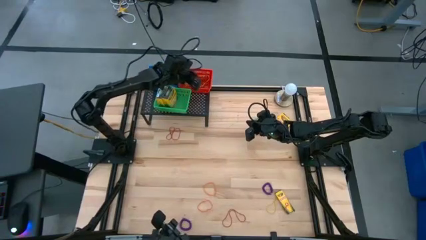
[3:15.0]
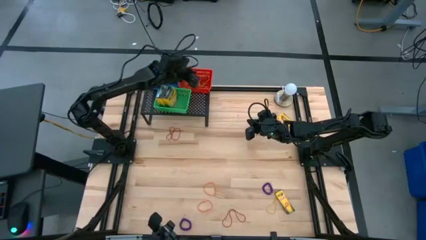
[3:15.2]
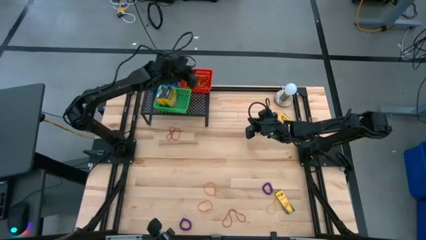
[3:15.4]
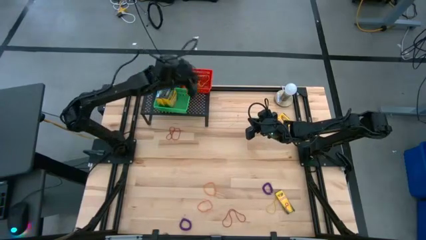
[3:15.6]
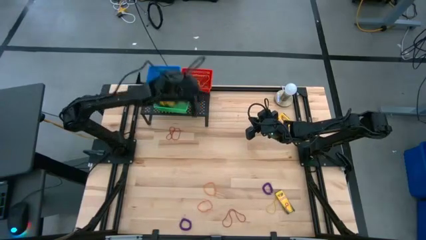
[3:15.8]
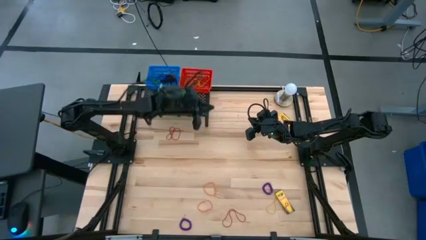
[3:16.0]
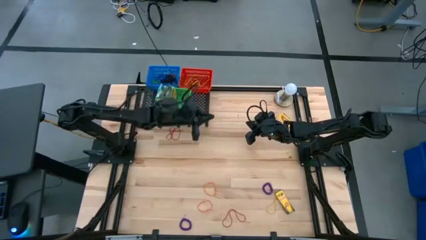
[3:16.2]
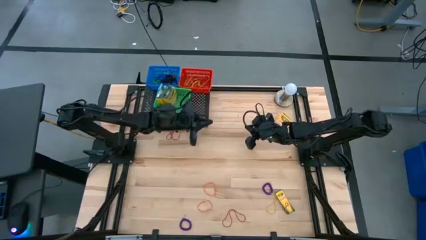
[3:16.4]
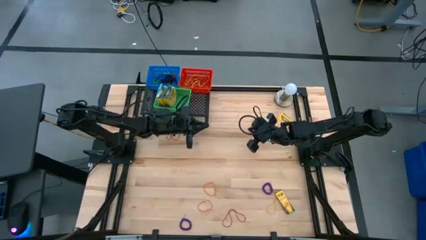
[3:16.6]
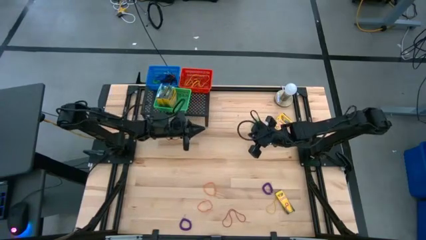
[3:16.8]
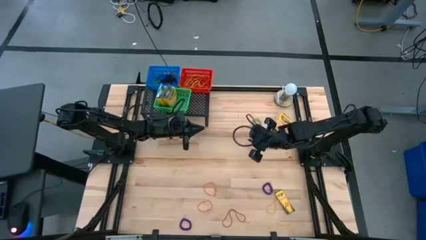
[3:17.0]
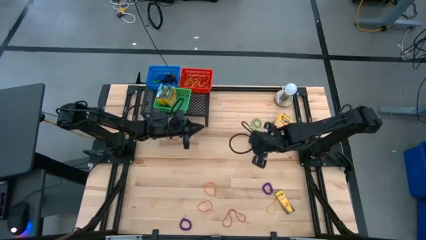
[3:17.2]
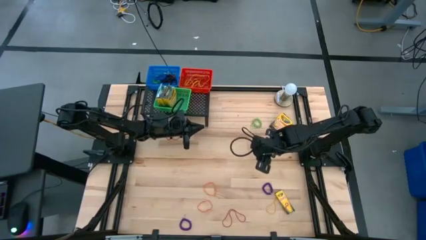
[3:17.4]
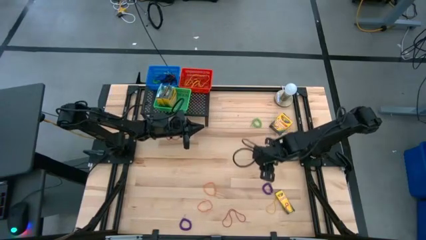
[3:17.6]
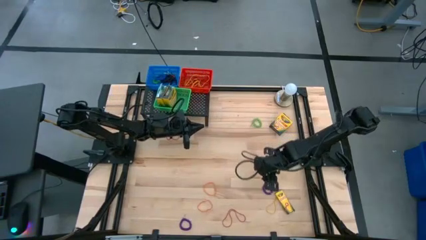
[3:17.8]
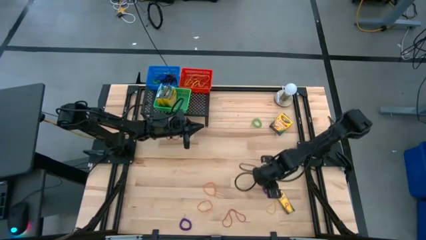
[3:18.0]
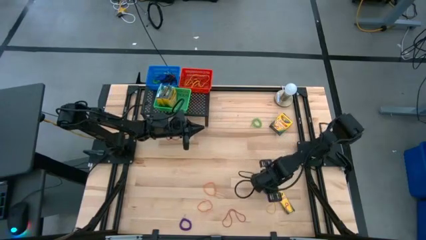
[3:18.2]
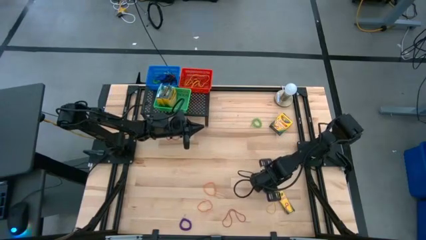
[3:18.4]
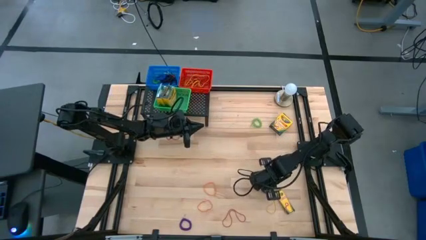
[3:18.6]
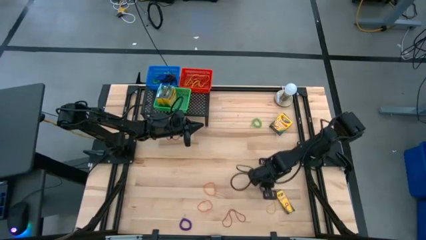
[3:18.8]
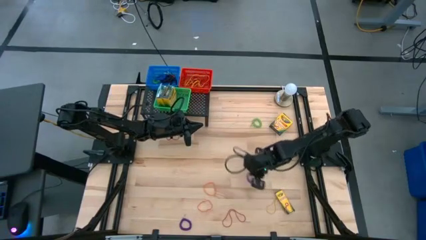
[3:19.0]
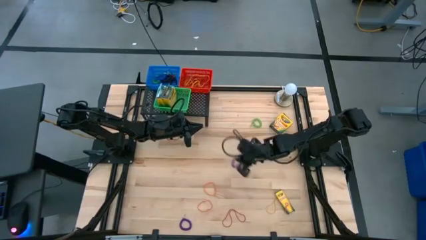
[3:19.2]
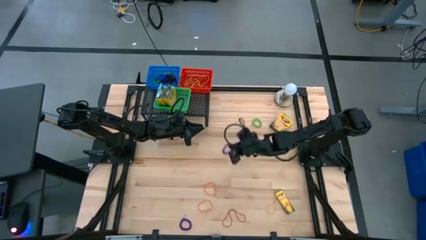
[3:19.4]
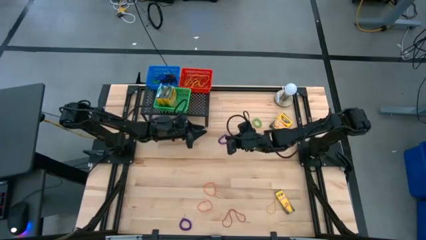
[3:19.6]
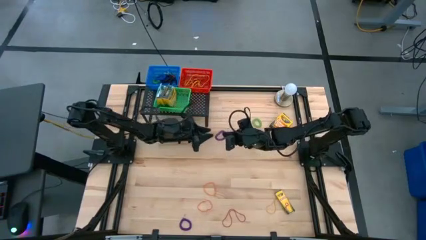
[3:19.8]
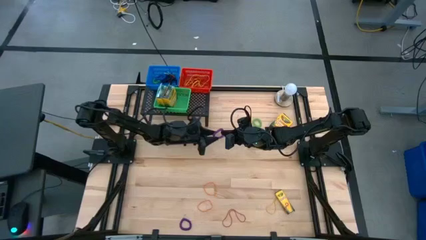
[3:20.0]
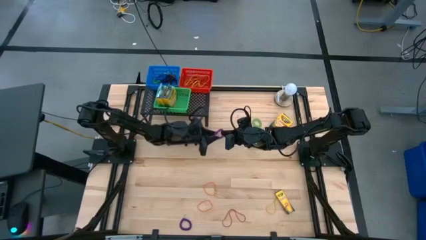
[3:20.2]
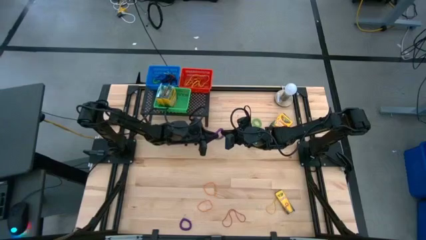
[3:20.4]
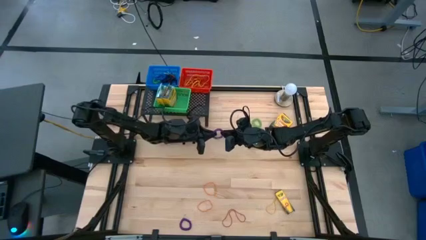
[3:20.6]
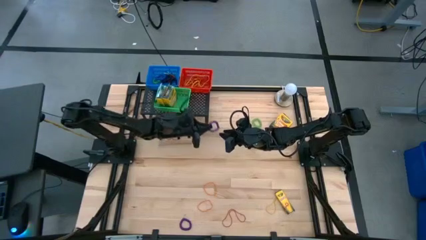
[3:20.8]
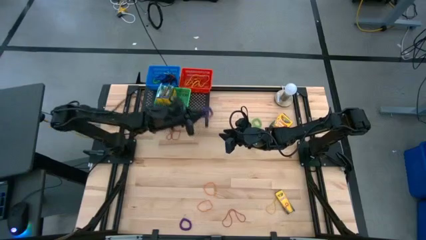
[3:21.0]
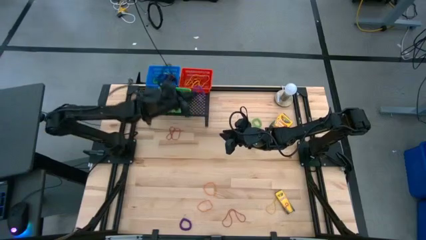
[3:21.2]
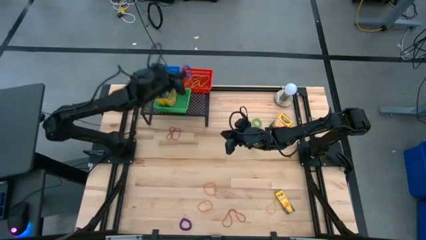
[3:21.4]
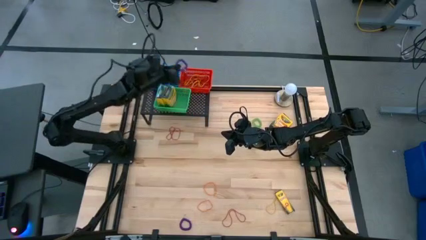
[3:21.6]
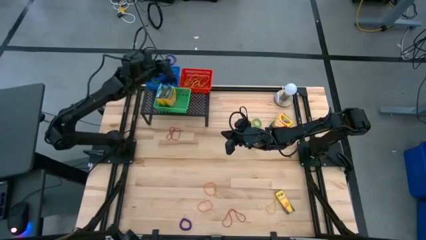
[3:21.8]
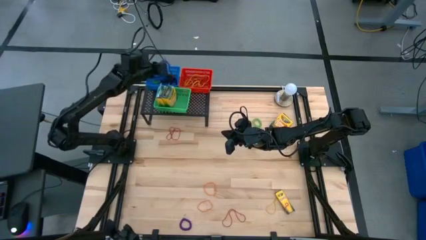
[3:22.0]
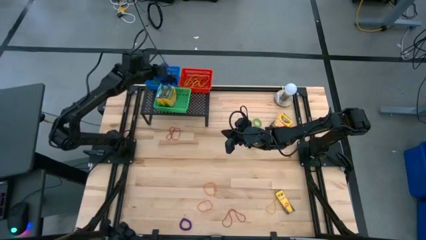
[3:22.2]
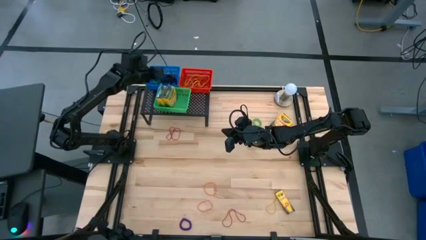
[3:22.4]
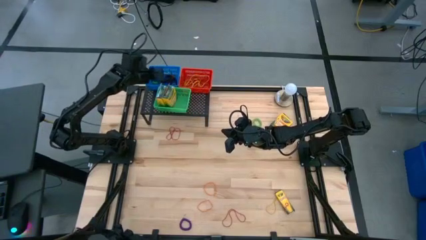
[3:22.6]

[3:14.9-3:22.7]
Task: Pick & Place Office Desk Supplies
Put the violet spring keychain into the blue bin

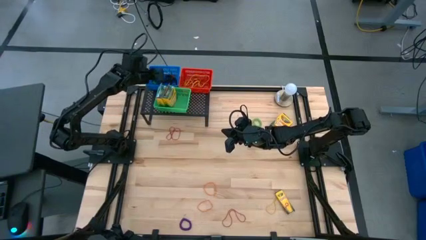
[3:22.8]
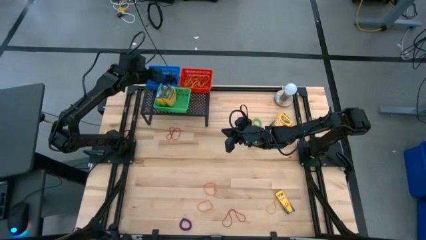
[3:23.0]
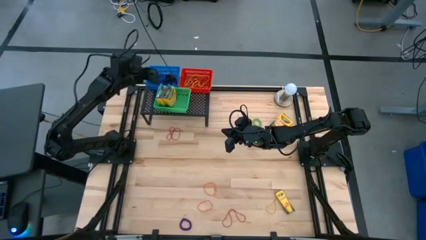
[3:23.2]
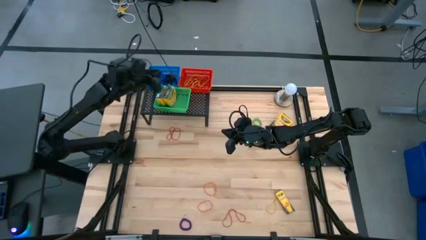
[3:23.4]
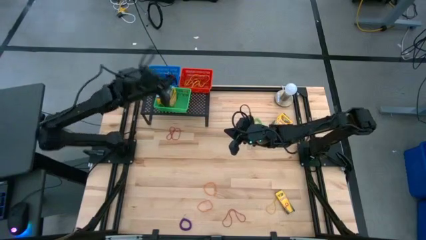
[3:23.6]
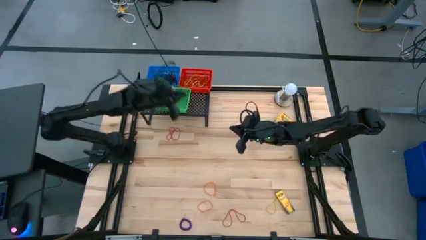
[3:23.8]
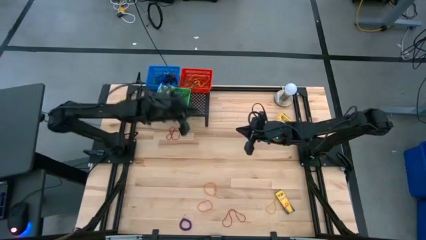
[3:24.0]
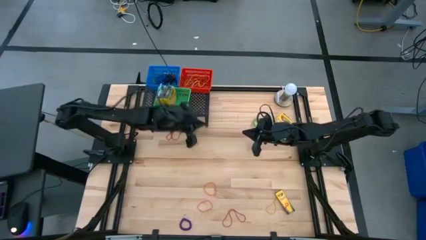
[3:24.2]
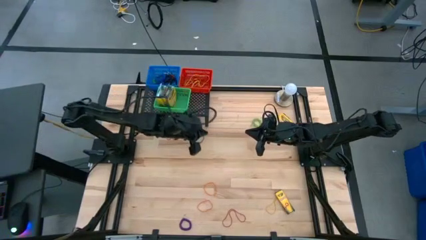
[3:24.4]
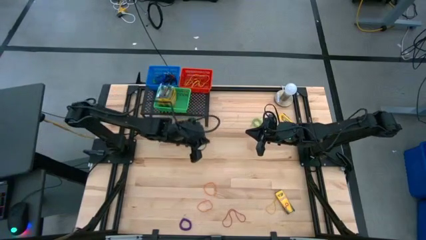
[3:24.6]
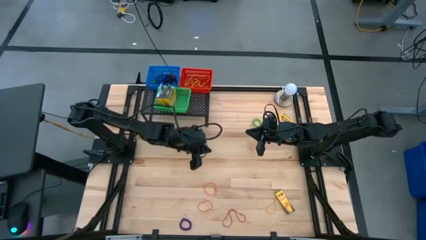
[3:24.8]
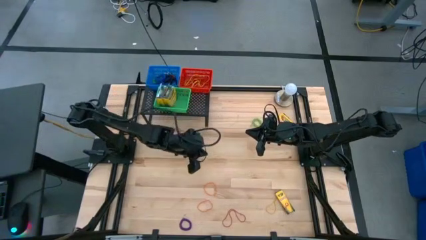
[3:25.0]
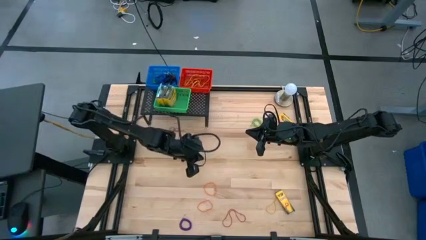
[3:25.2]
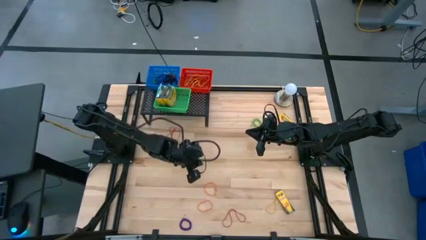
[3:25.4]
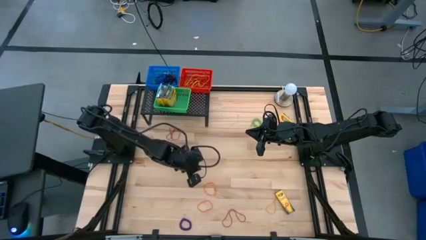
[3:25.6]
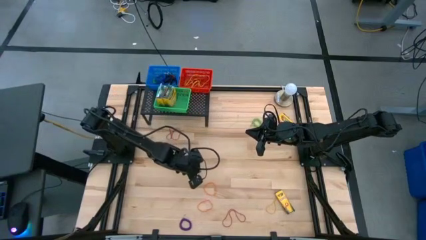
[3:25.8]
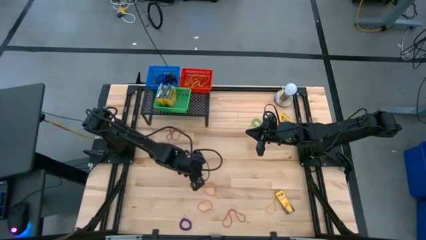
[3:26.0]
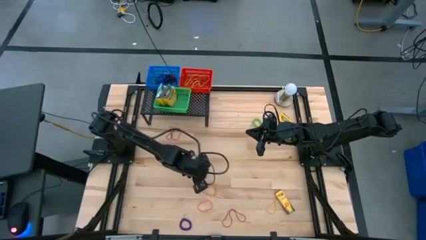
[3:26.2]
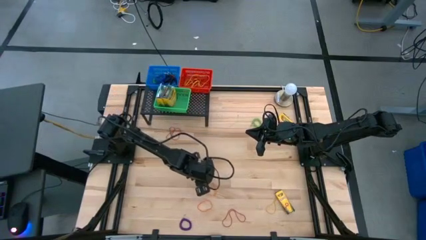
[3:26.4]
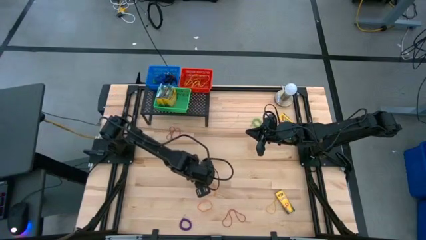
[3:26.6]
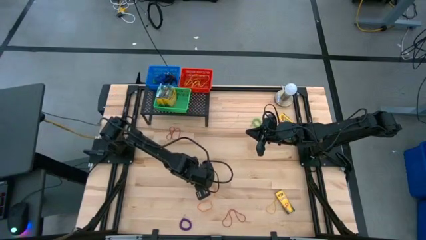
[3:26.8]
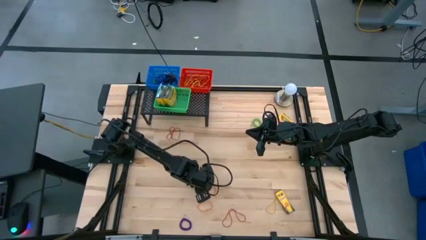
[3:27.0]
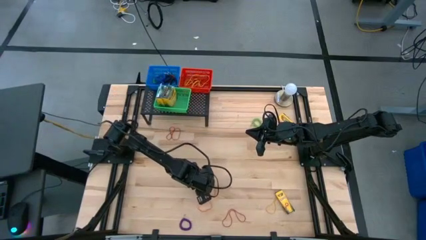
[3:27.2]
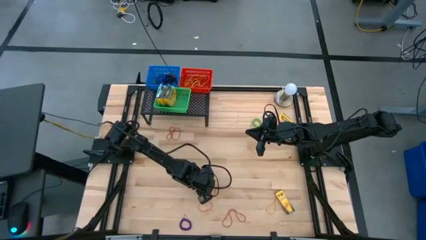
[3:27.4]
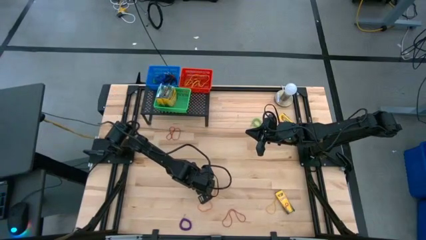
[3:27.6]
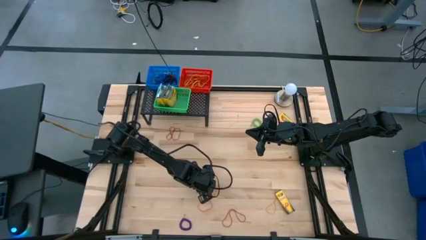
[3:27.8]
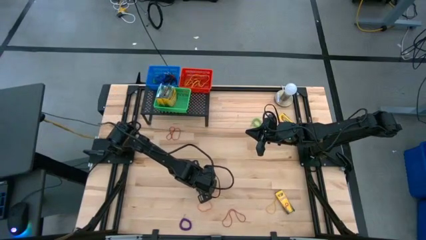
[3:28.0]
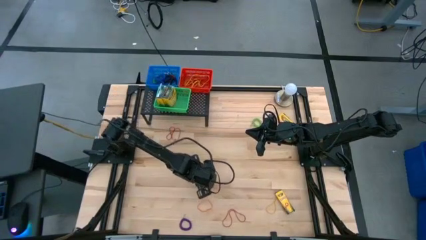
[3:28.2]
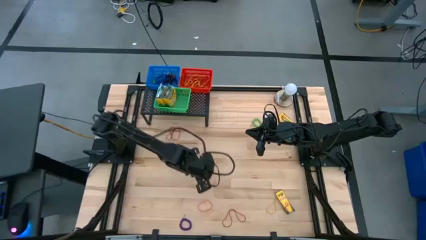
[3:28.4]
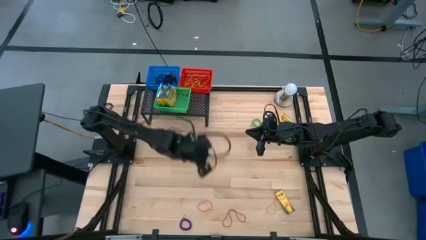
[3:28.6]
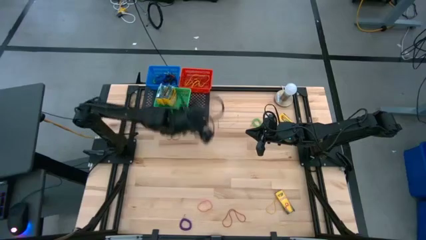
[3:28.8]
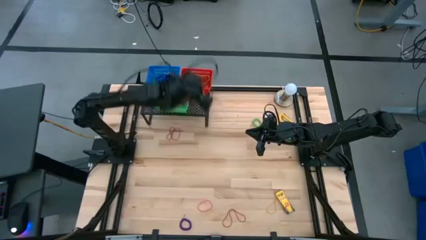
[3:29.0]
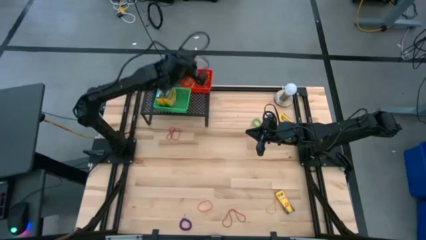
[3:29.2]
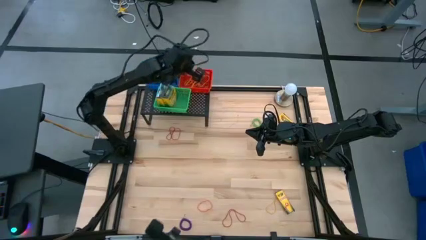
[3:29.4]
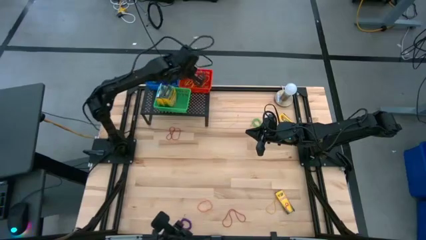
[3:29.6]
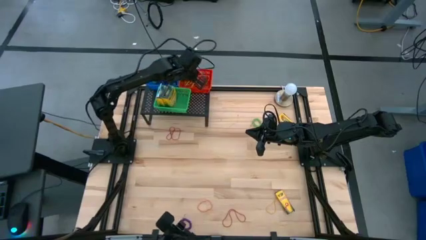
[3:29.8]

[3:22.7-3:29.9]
Put the orange rubber band into the red bin
